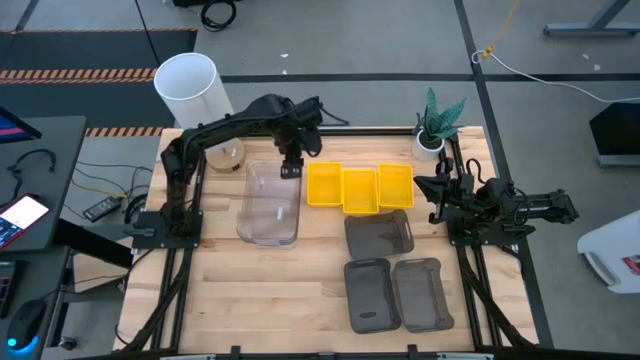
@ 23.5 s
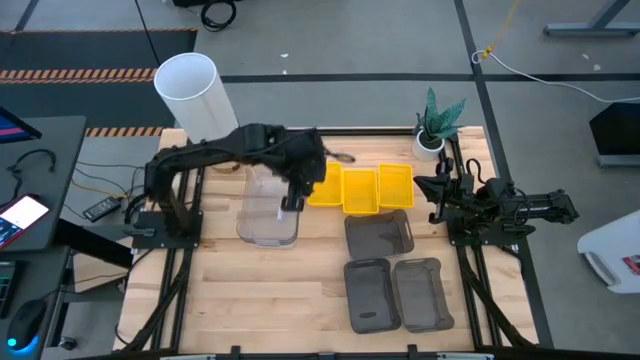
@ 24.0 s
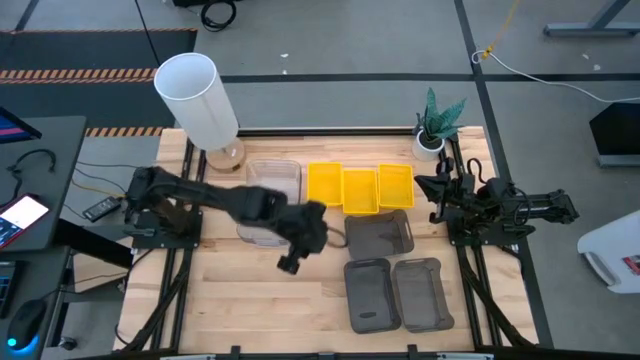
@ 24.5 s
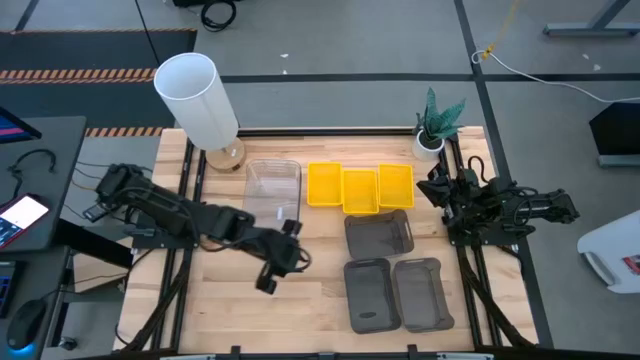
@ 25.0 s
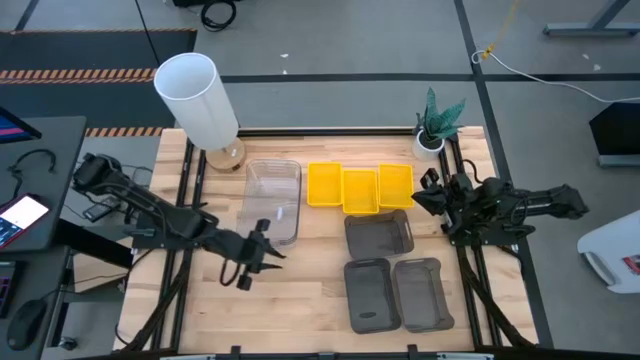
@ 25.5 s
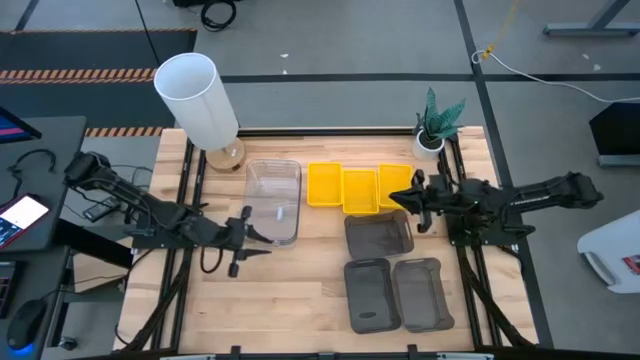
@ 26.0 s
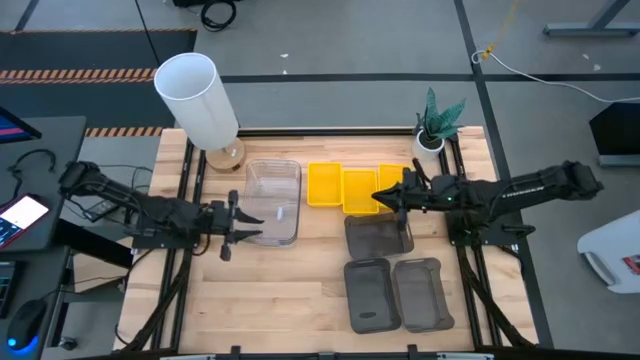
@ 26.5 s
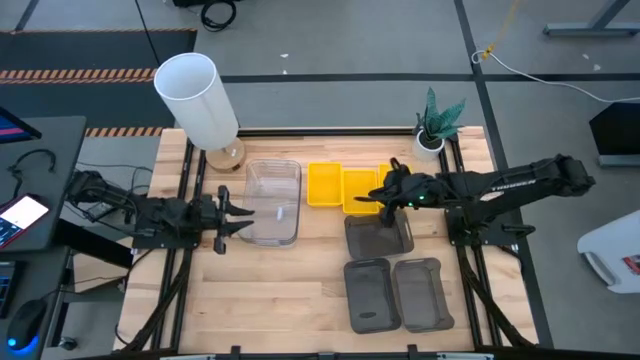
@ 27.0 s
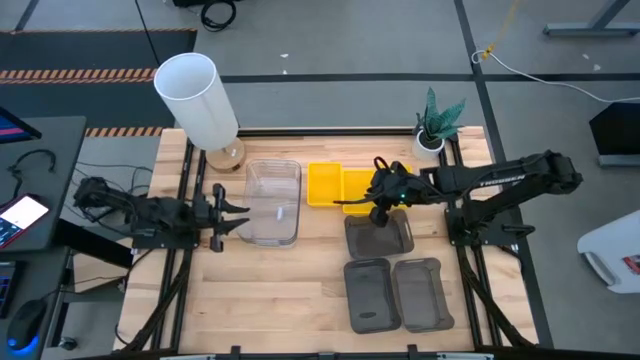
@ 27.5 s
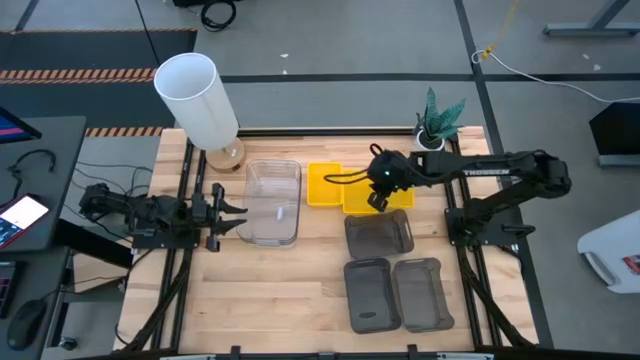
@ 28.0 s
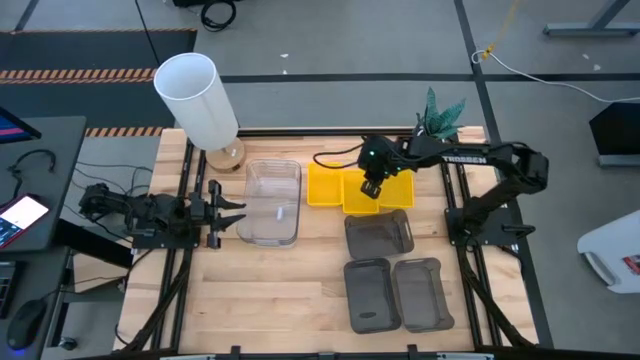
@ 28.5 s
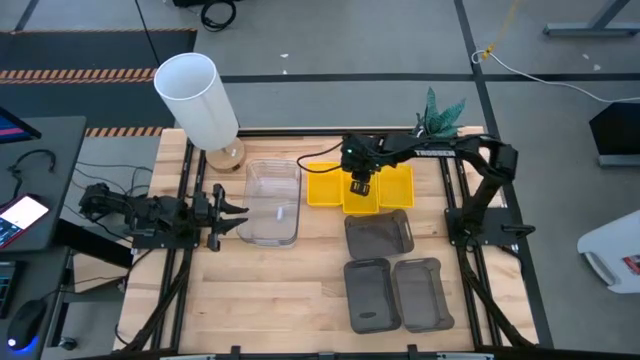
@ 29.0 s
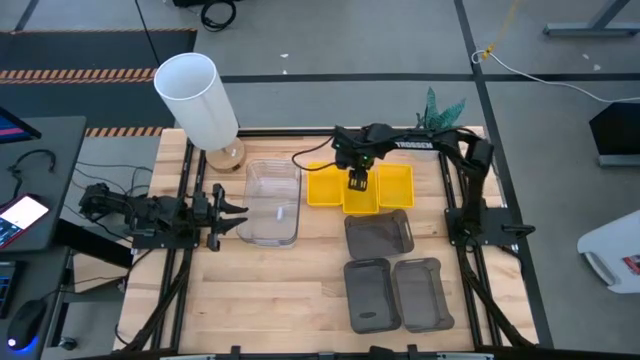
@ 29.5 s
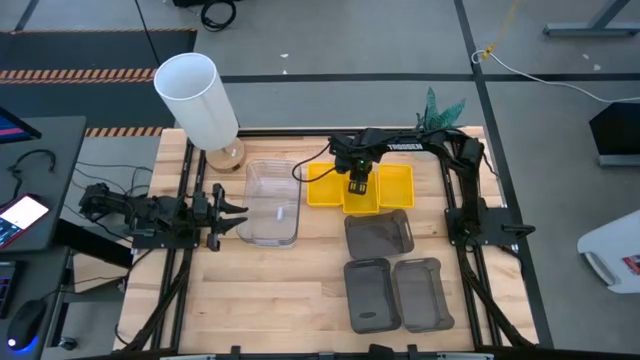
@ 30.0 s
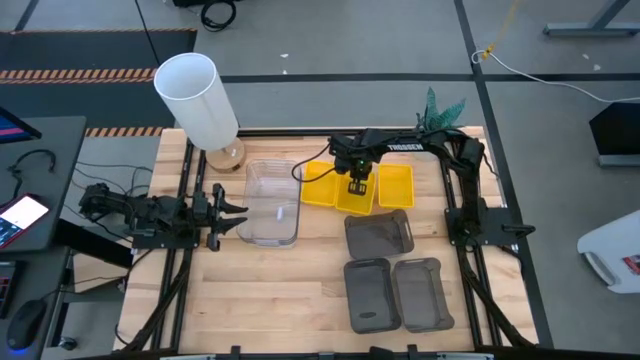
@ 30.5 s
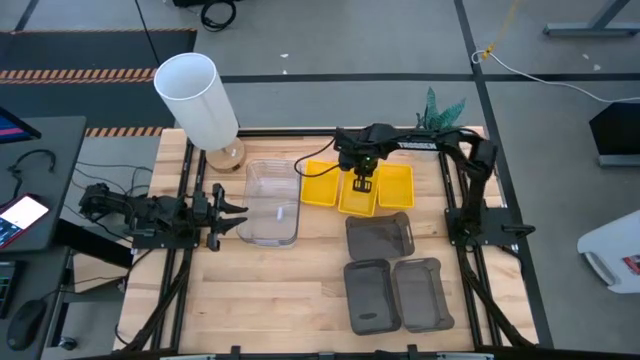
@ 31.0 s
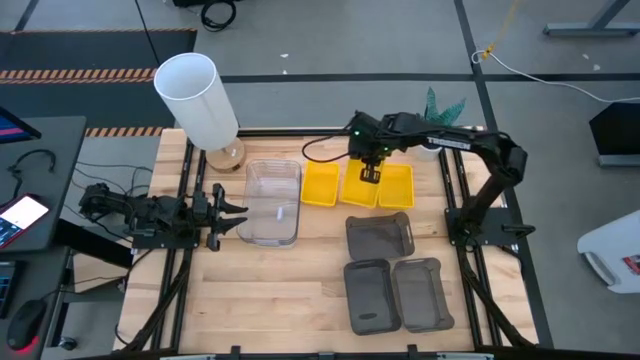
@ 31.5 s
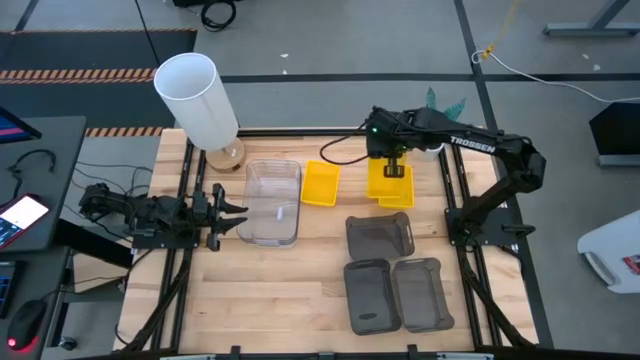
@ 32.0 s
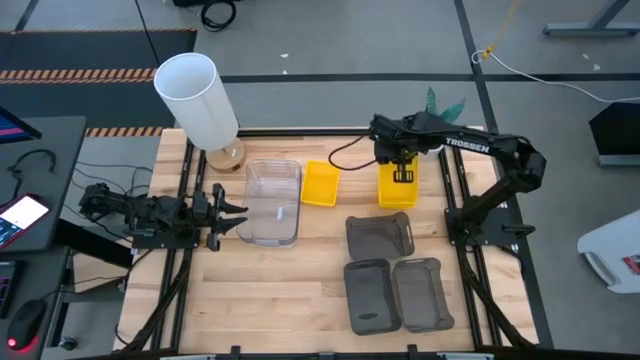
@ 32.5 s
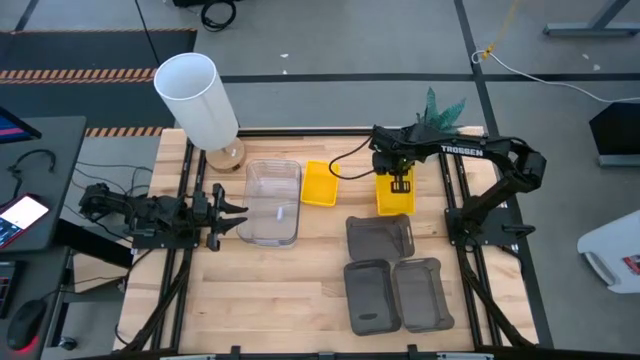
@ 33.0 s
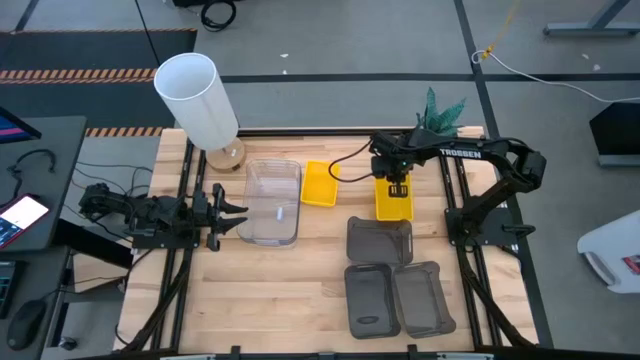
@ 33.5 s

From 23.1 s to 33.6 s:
Stack the middle yellow bin on the right yellow bin

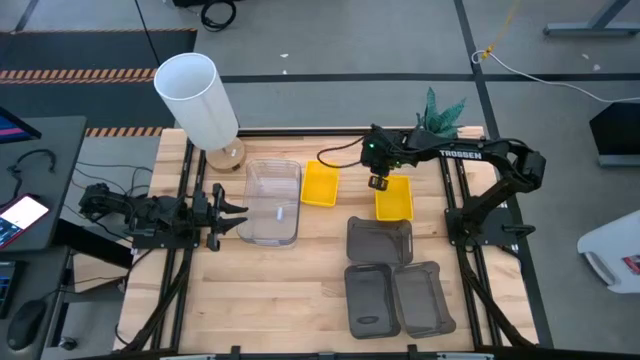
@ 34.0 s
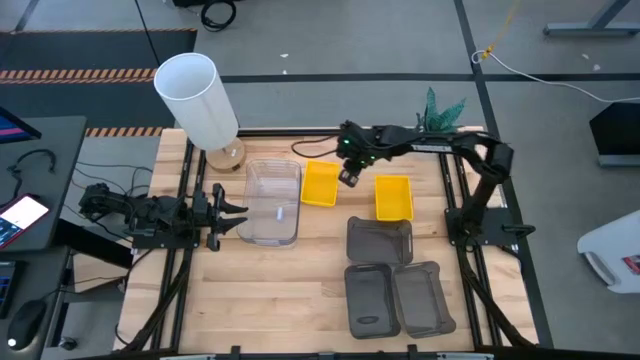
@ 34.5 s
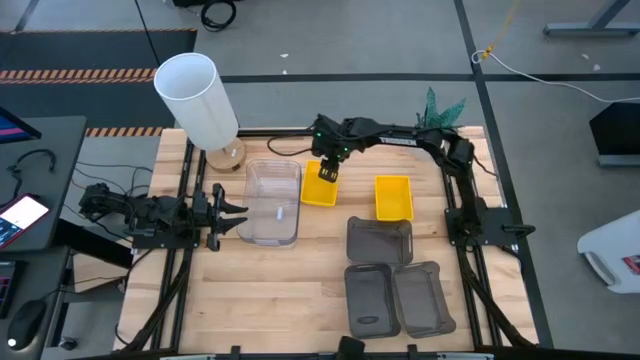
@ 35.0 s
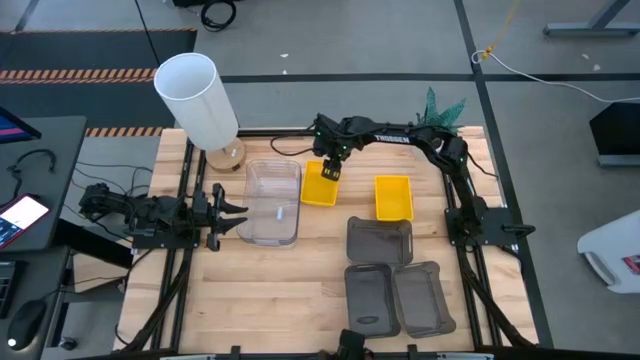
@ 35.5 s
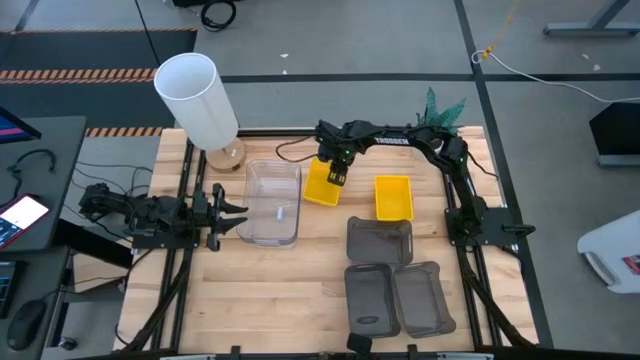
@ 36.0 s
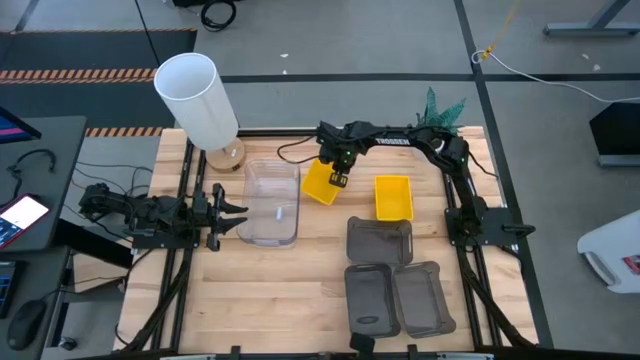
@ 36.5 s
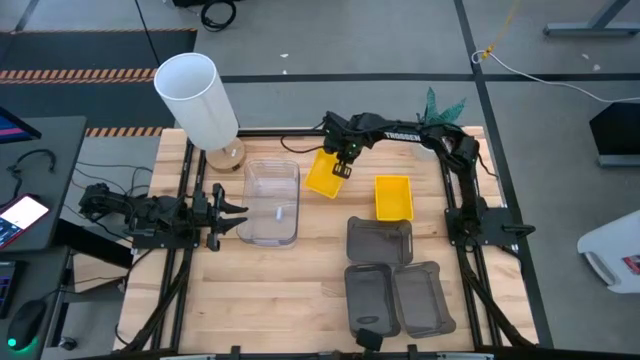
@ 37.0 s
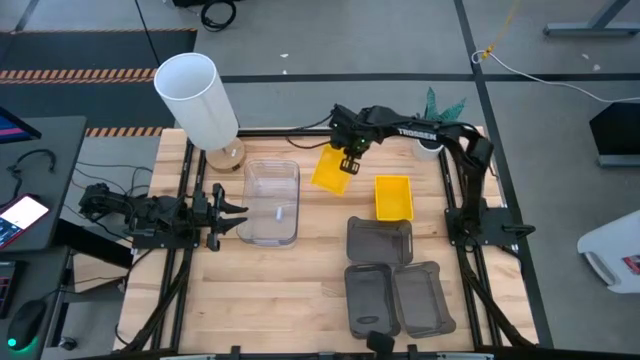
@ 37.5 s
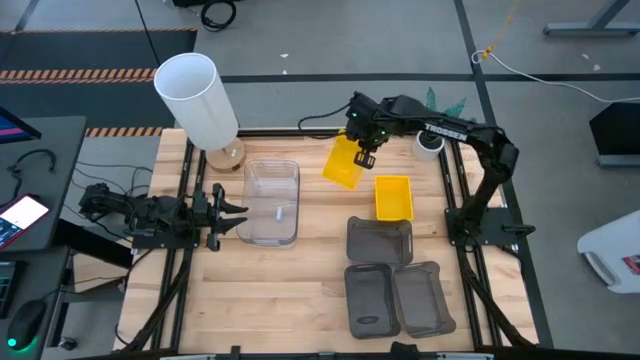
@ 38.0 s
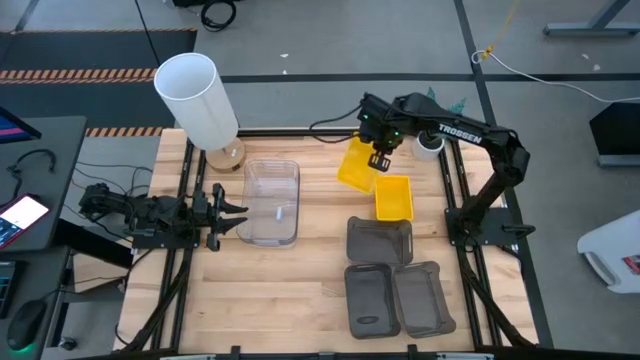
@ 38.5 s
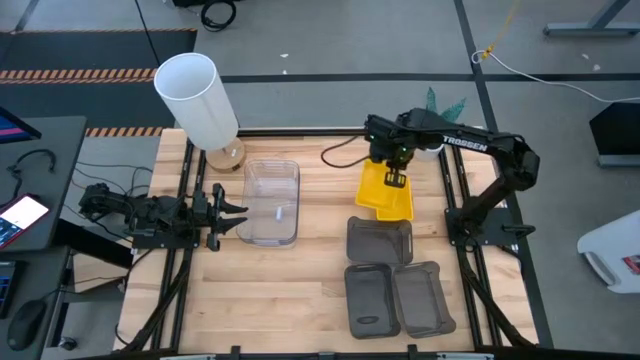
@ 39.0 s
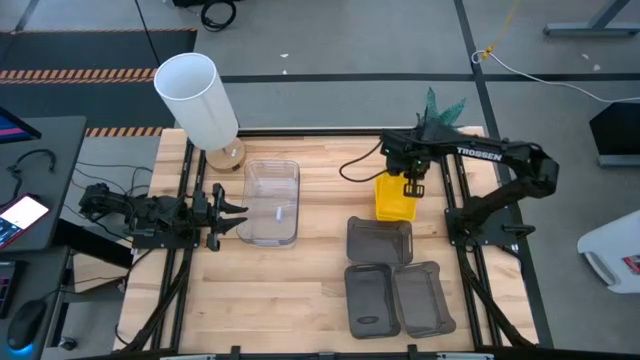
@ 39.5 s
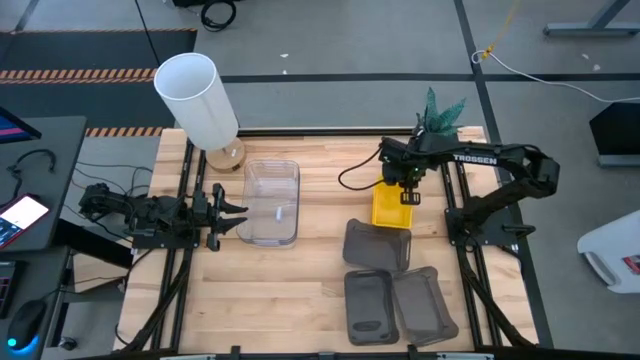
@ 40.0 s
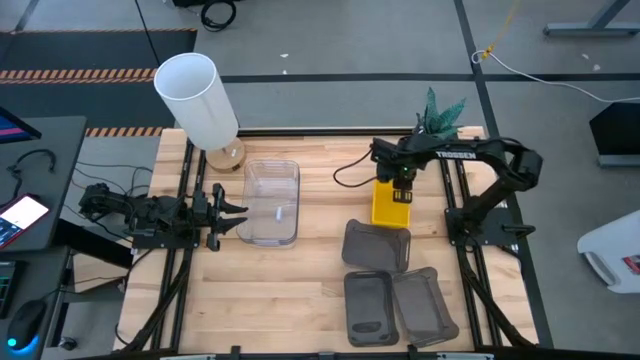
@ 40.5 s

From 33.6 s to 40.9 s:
Stack the left yellow bin on the right yellow bin

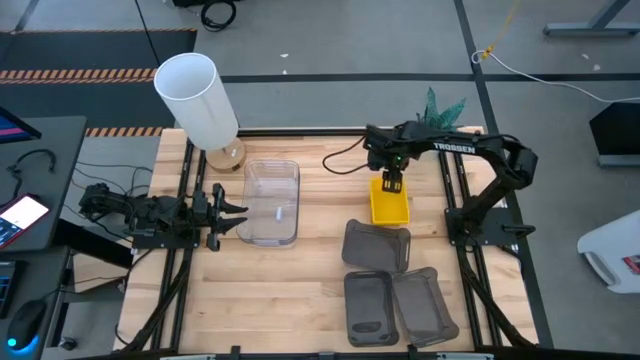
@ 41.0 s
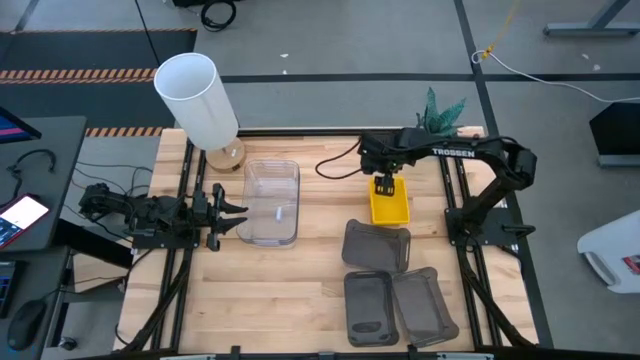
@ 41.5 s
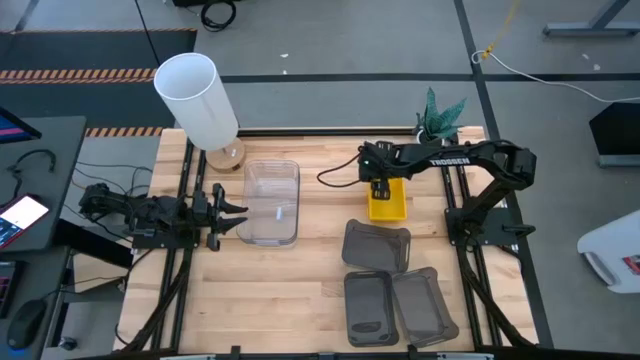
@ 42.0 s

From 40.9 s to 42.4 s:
Move the stacked yellow bins to the top right of the table
